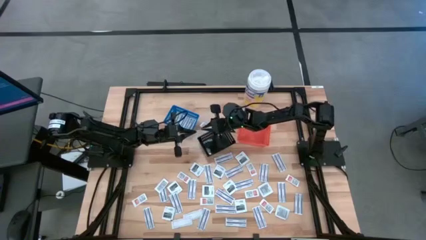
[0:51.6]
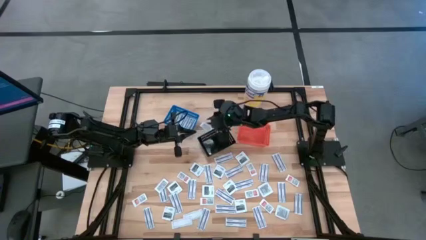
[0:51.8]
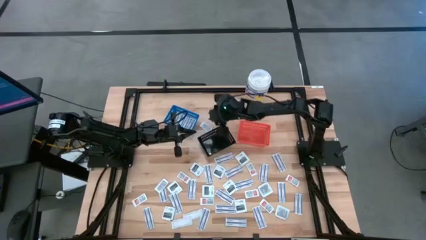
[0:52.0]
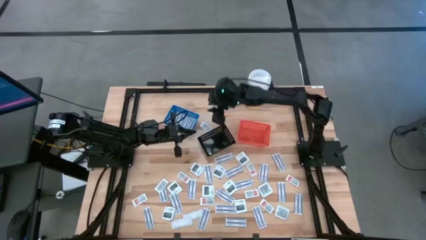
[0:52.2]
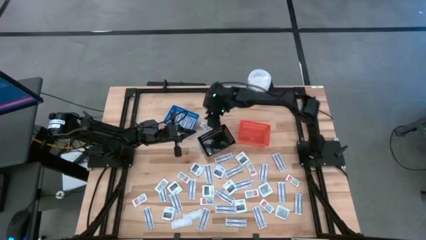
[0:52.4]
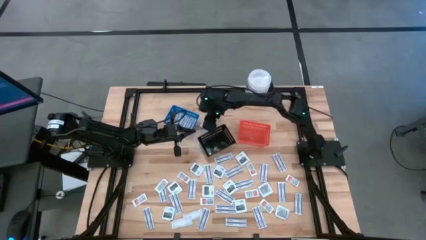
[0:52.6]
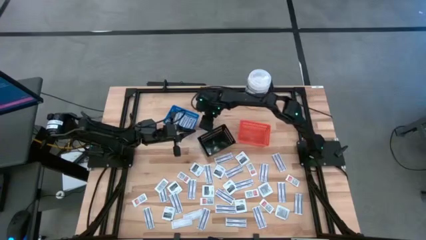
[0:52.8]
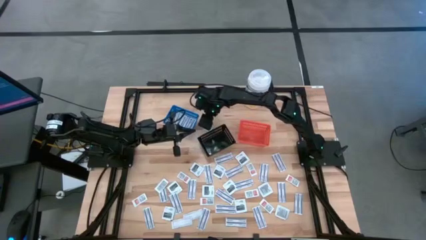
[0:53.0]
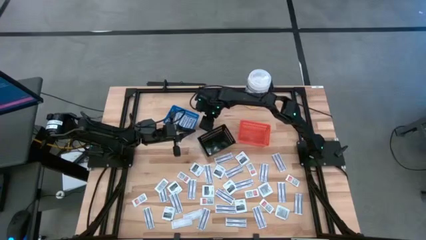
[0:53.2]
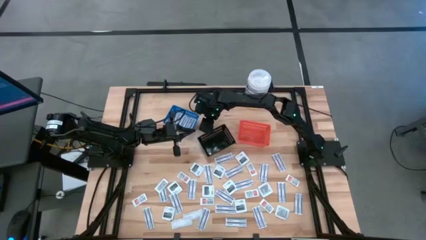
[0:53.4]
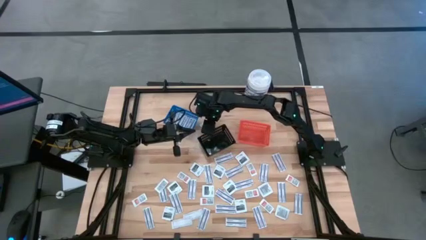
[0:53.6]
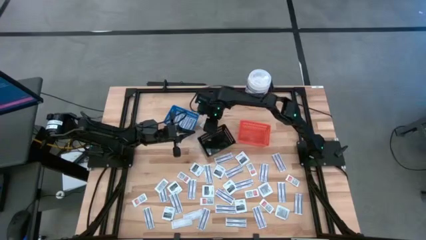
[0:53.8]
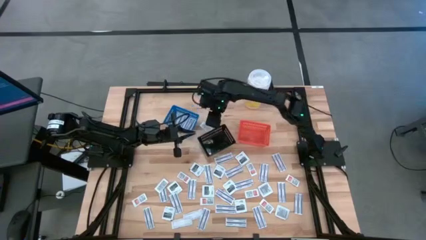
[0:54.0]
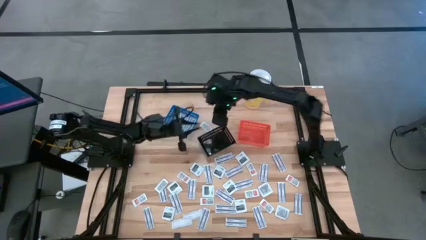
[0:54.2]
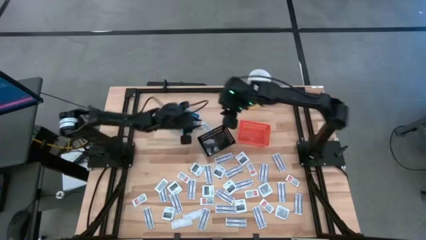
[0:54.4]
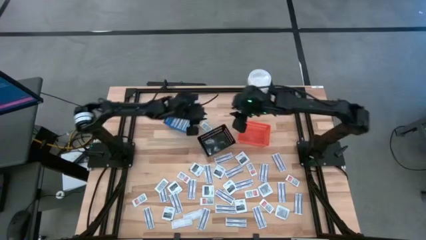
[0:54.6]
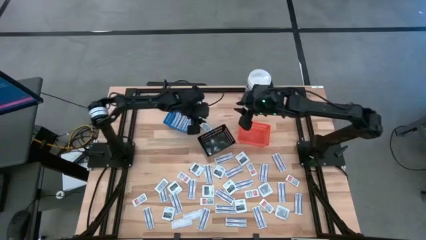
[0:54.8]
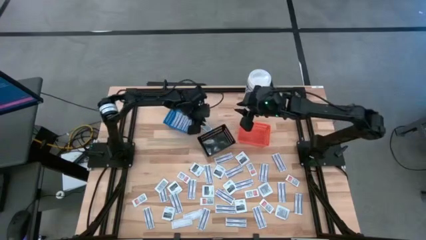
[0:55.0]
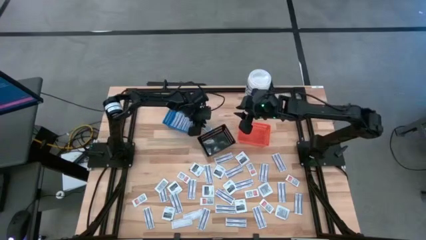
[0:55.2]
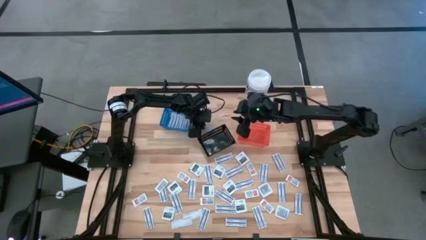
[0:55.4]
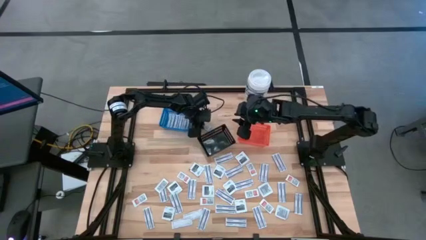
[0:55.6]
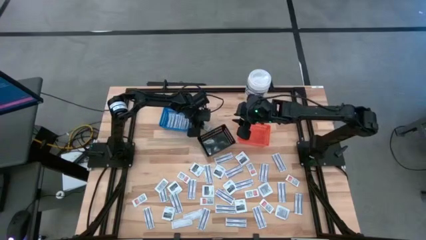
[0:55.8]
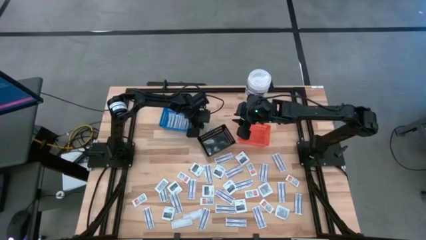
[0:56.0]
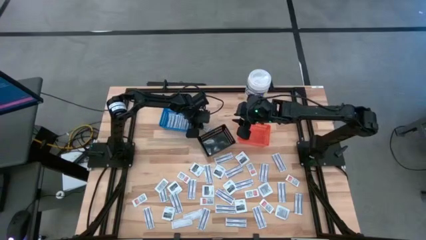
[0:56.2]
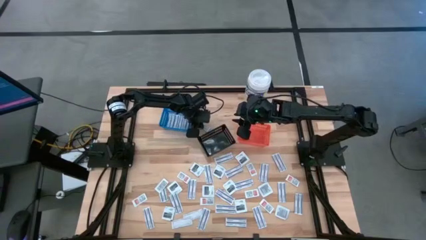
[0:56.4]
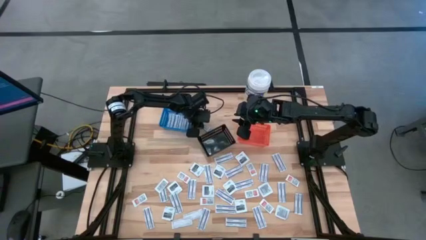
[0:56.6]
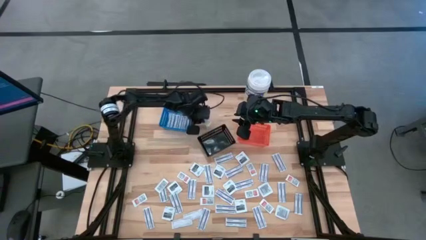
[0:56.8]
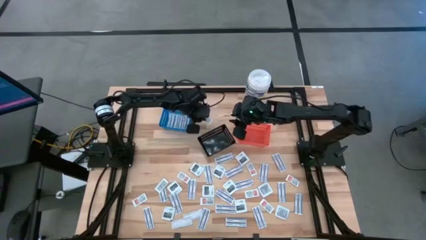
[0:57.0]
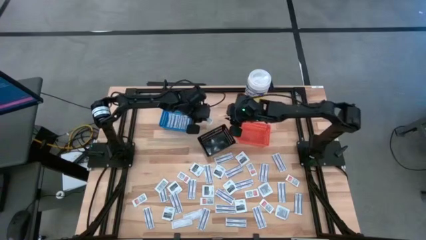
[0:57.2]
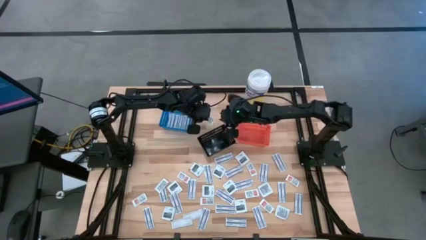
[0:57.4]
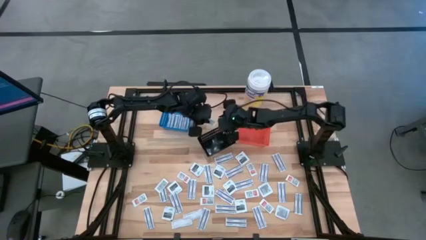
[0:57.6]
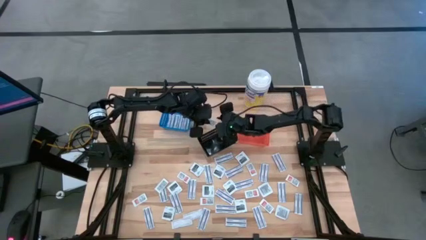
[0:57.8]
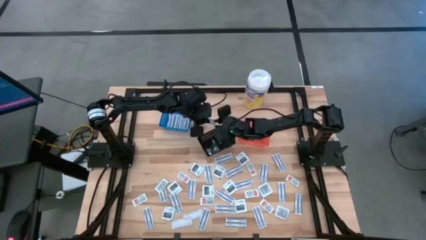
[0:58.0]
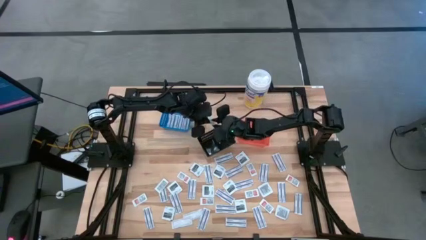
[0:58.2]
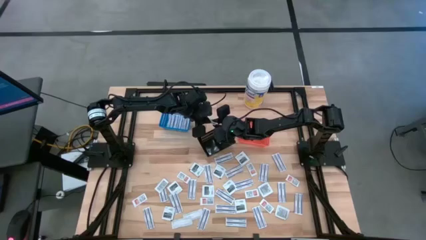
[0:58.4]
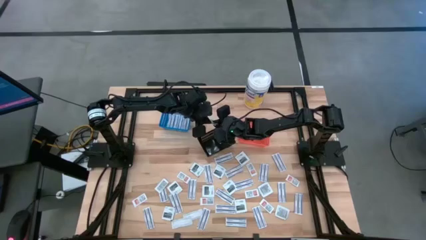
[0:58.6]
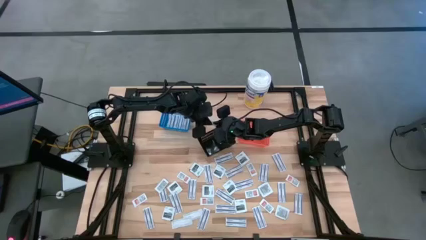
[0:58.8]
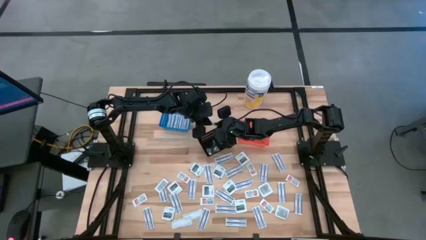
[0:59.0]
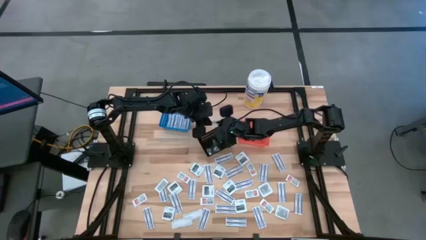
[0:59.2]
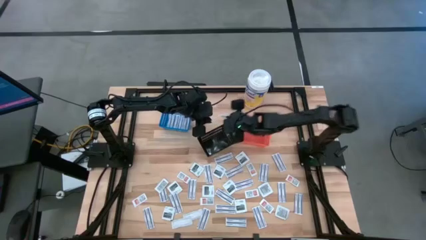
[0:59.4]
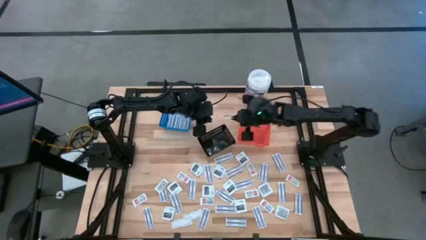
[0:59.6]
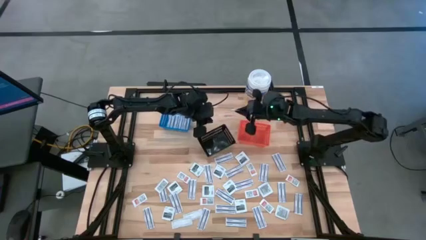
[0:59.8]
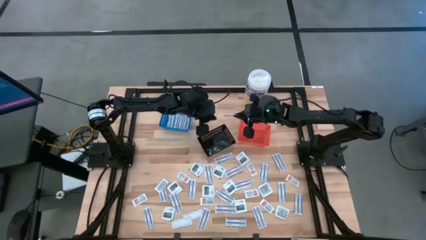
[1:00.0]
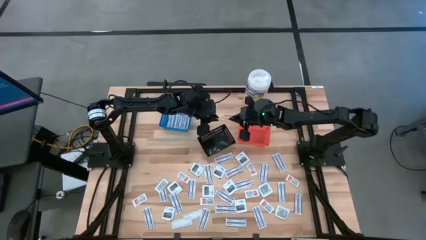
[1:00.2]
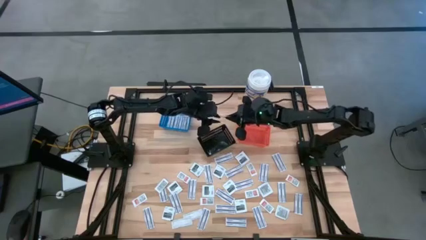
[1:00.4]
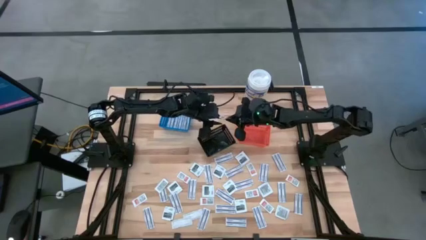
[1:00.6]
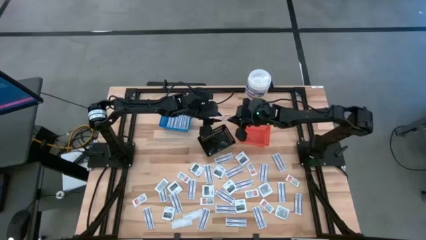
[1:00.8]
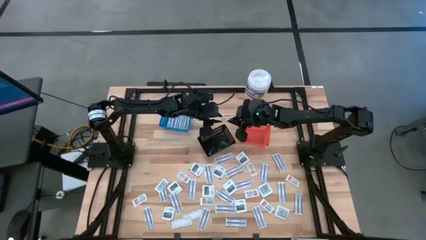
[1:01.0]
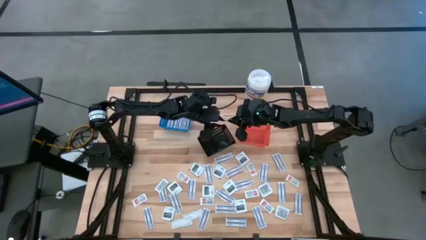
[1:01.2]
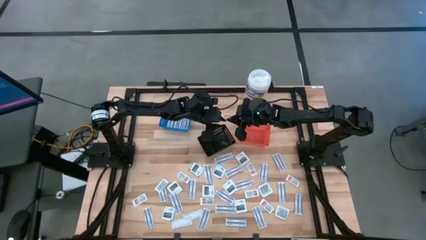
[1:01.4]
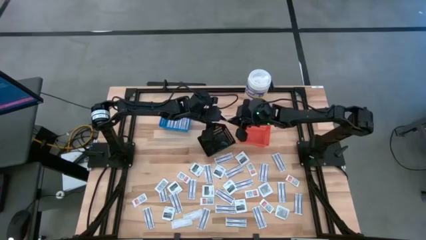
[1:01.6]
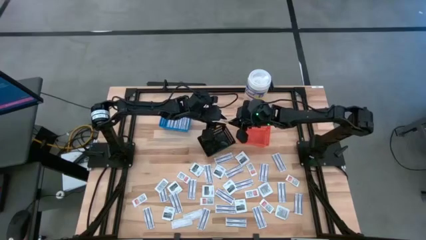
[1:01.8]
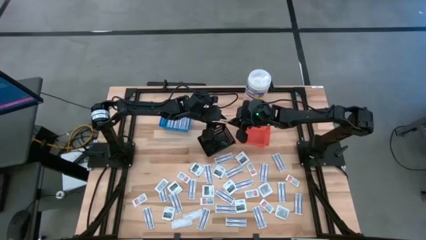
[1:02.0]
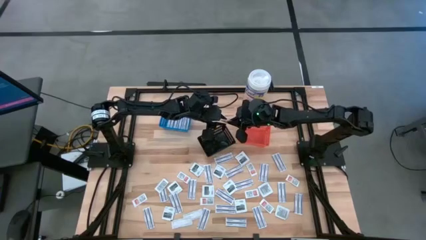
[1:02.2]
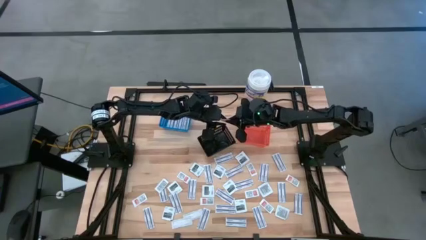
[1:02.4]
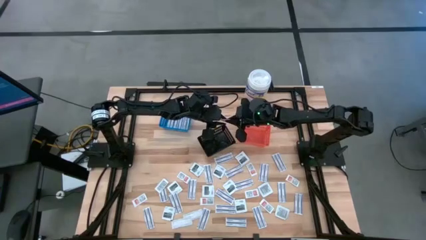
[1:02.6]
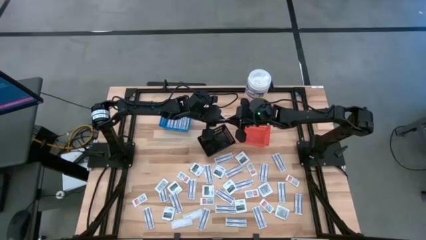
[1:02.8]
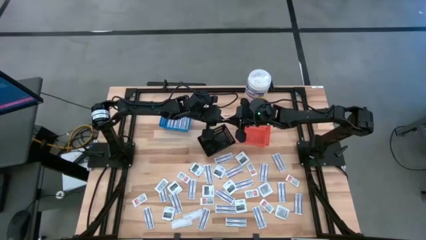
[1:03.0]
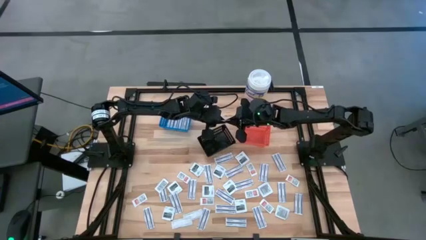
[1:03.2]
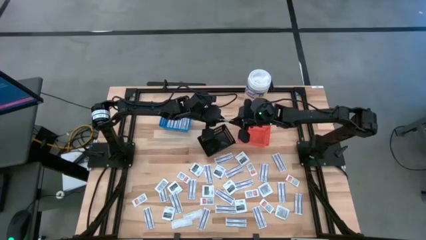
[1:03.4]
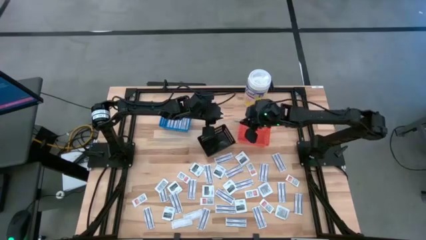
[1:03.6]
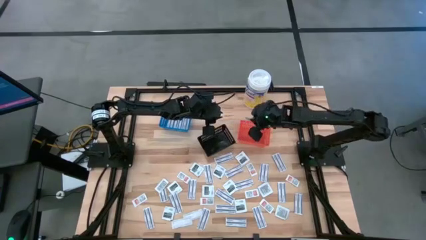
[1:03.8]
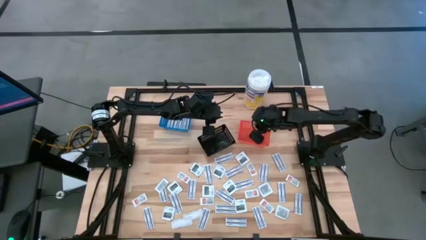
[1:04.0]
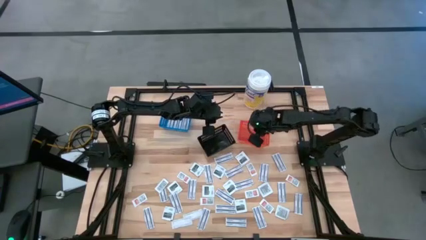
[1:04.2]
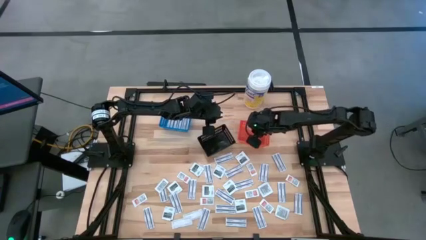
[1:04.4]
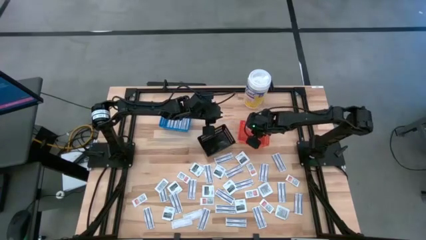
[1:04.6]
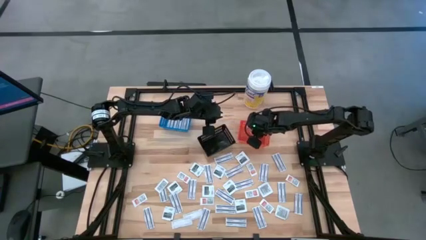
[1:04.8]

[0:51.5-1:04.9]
Task: Pick & Place First Aid Supplies
Put the ointment pack into the orange bin
